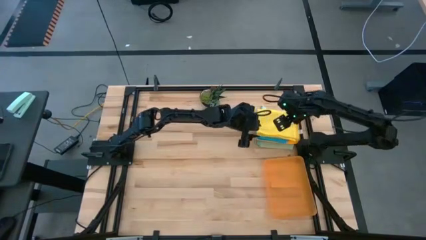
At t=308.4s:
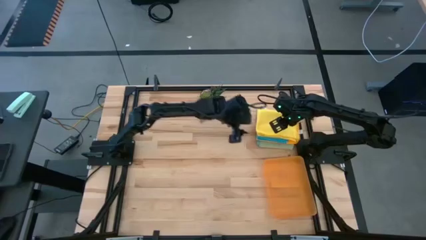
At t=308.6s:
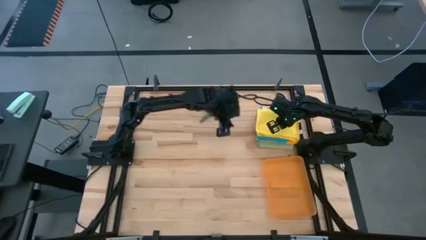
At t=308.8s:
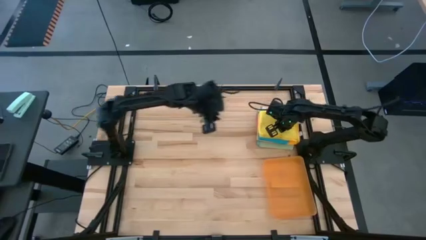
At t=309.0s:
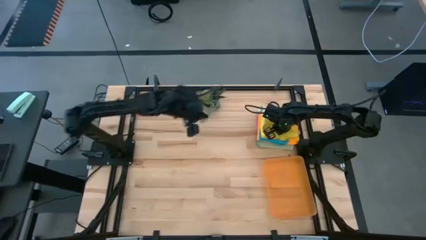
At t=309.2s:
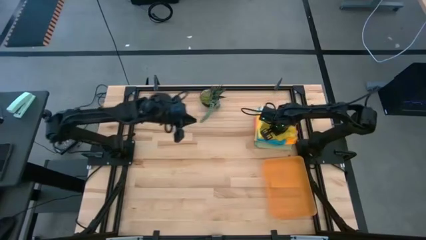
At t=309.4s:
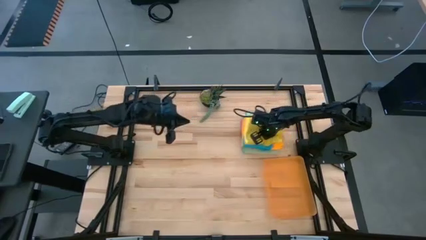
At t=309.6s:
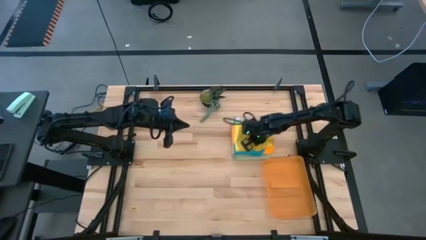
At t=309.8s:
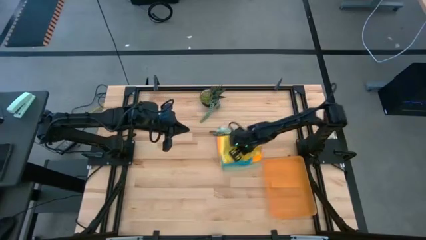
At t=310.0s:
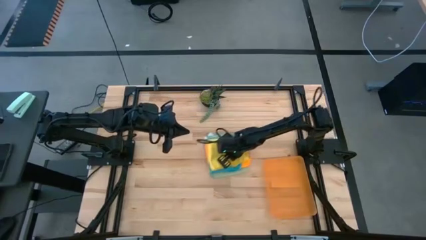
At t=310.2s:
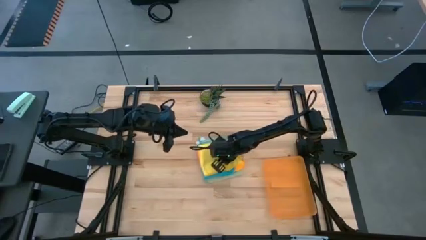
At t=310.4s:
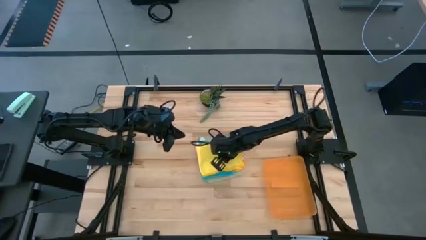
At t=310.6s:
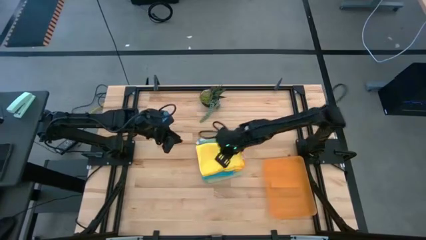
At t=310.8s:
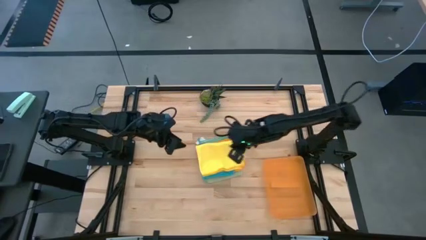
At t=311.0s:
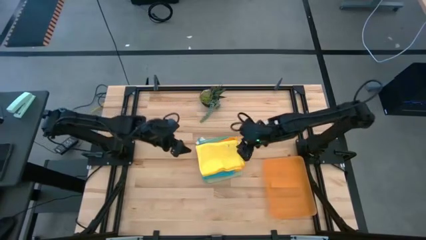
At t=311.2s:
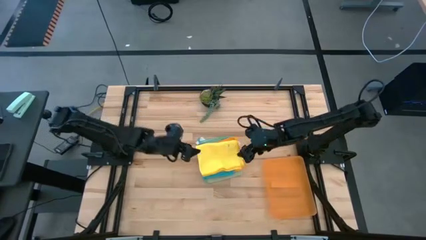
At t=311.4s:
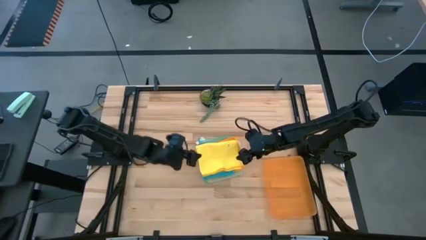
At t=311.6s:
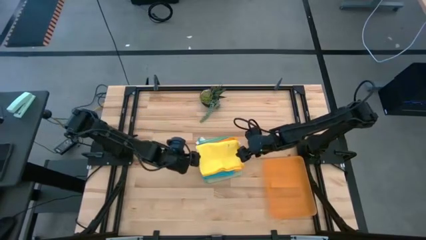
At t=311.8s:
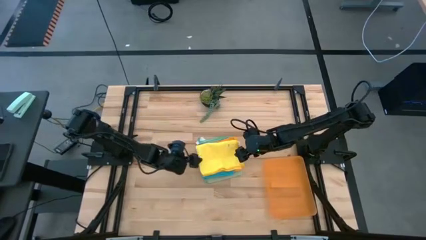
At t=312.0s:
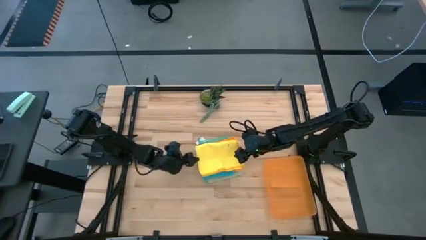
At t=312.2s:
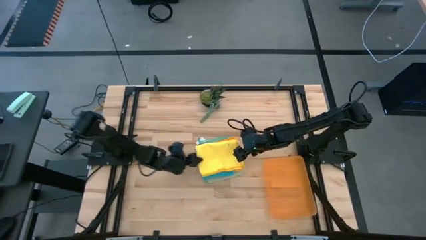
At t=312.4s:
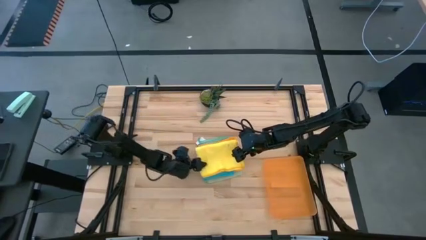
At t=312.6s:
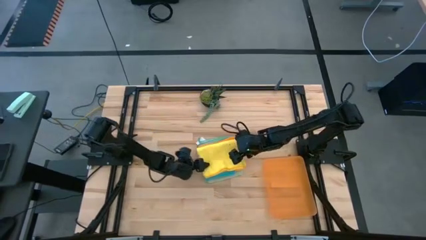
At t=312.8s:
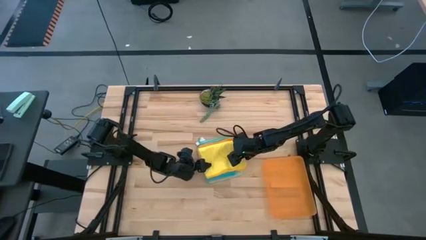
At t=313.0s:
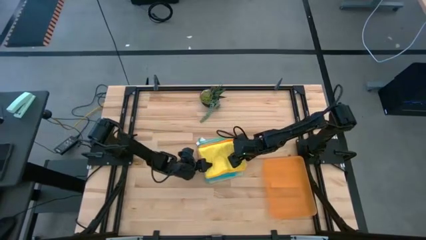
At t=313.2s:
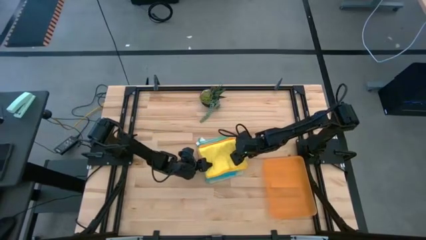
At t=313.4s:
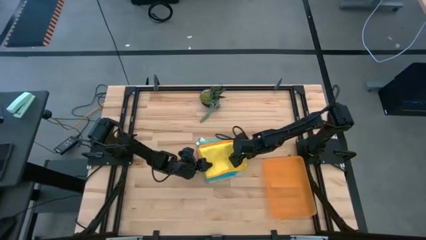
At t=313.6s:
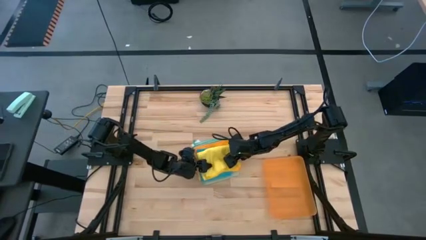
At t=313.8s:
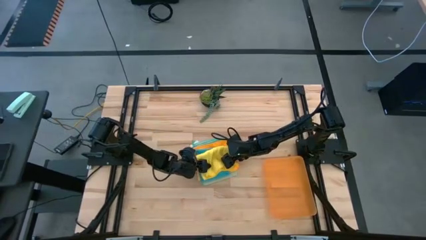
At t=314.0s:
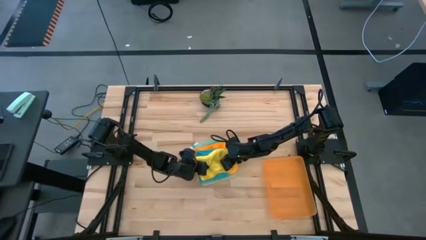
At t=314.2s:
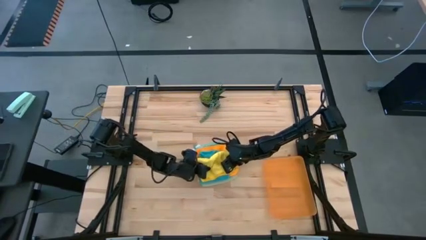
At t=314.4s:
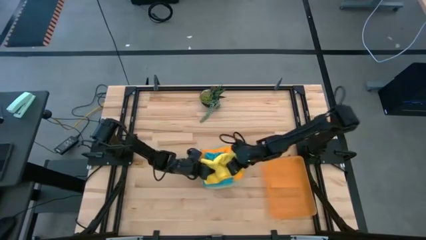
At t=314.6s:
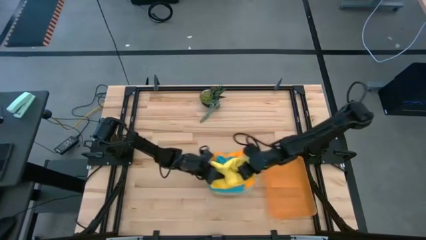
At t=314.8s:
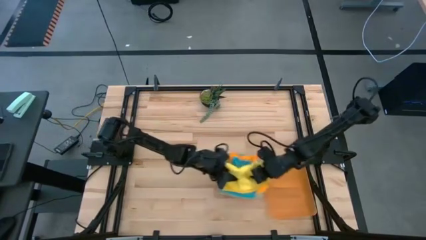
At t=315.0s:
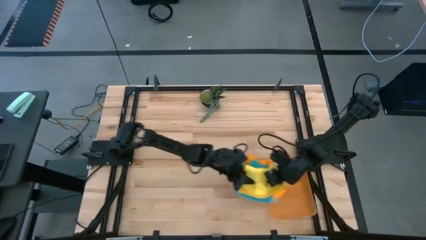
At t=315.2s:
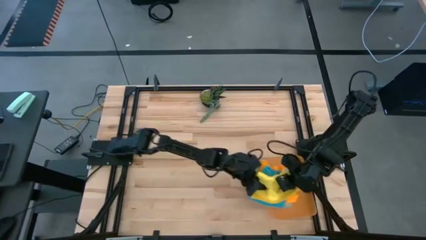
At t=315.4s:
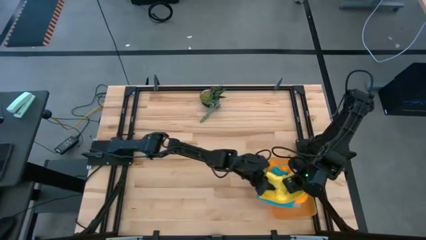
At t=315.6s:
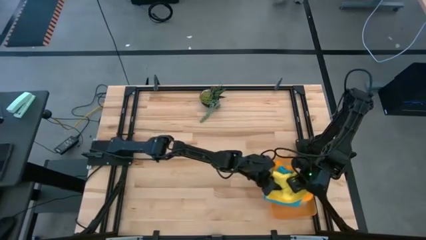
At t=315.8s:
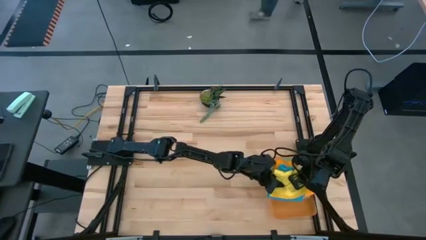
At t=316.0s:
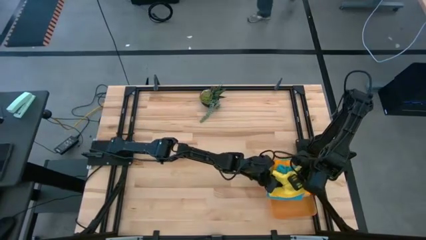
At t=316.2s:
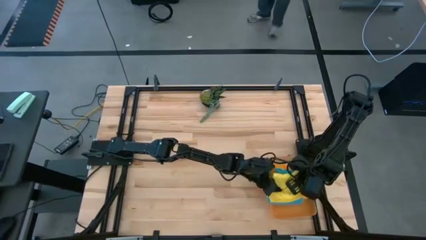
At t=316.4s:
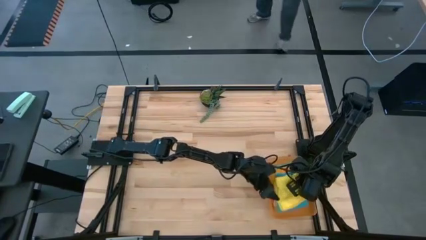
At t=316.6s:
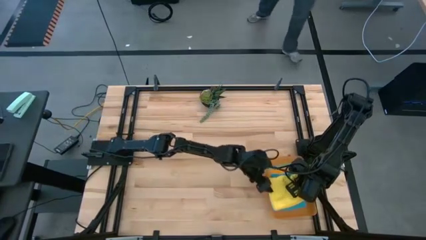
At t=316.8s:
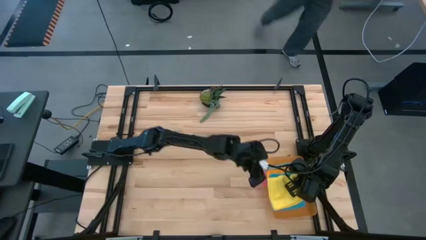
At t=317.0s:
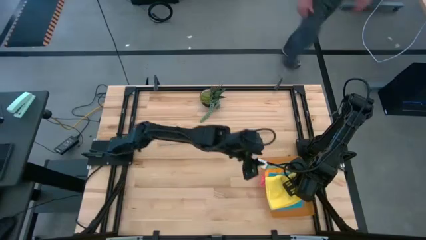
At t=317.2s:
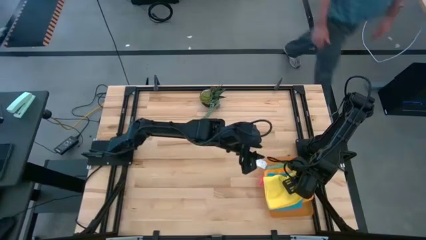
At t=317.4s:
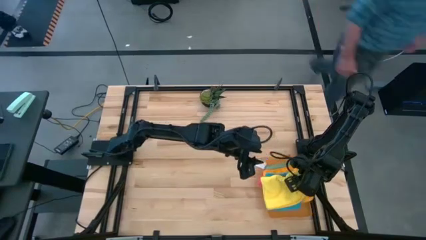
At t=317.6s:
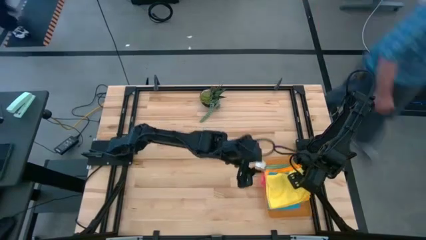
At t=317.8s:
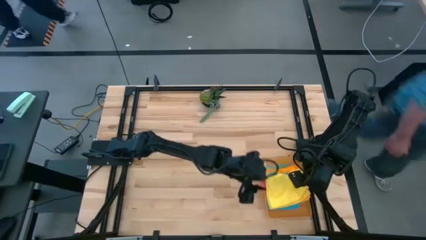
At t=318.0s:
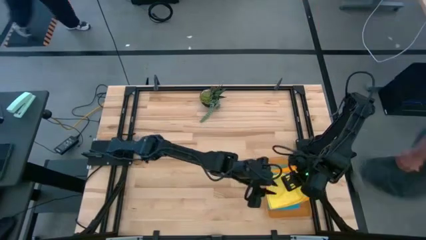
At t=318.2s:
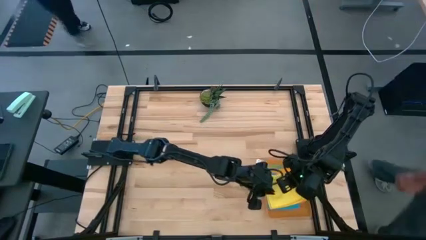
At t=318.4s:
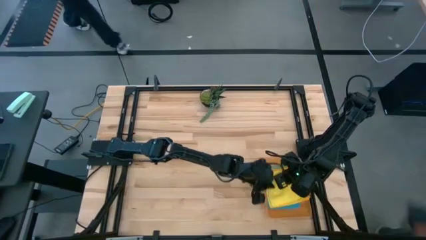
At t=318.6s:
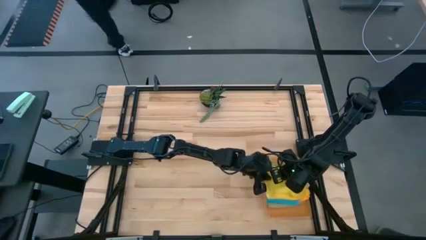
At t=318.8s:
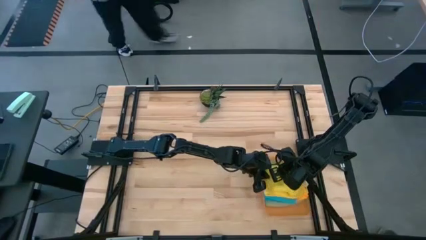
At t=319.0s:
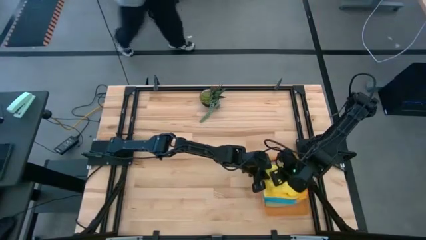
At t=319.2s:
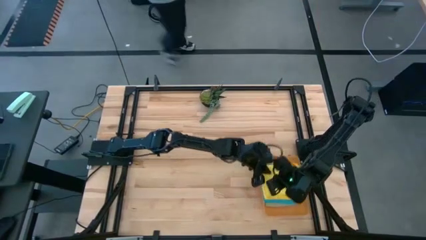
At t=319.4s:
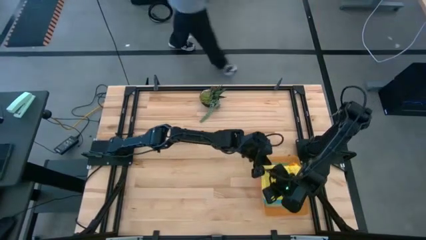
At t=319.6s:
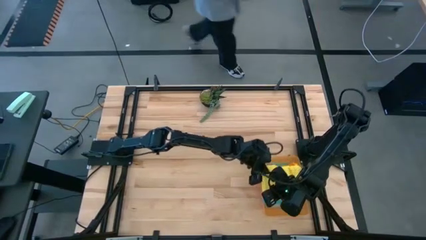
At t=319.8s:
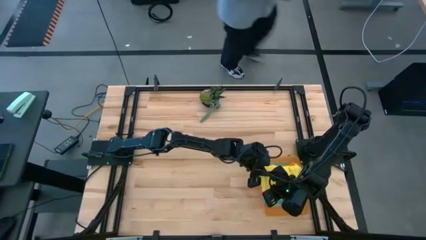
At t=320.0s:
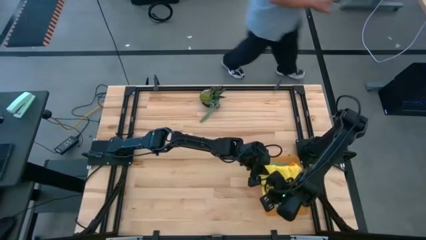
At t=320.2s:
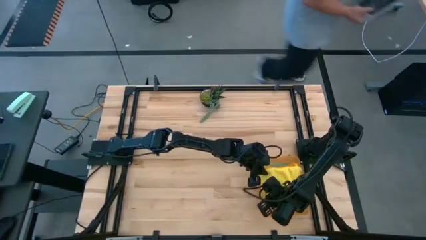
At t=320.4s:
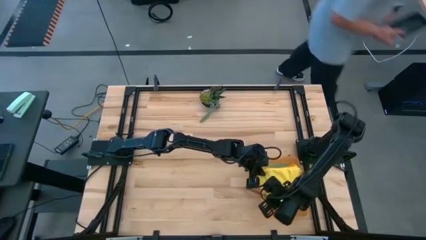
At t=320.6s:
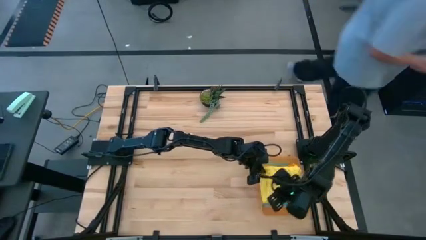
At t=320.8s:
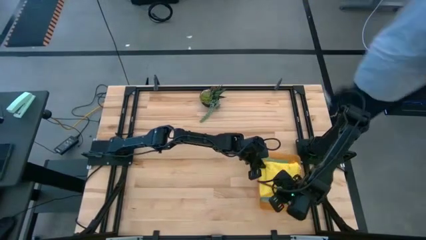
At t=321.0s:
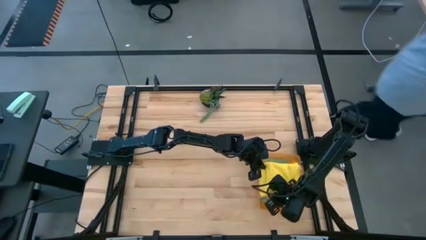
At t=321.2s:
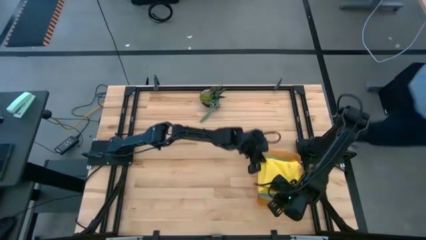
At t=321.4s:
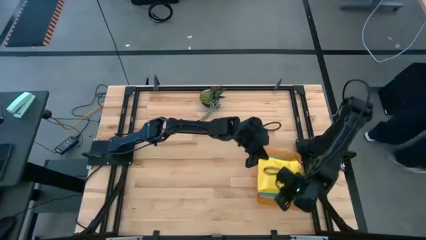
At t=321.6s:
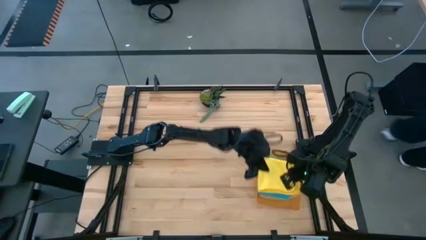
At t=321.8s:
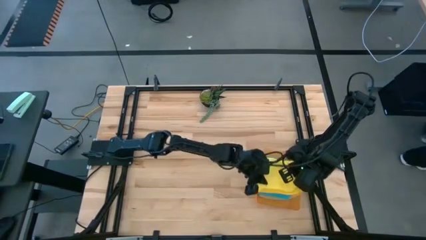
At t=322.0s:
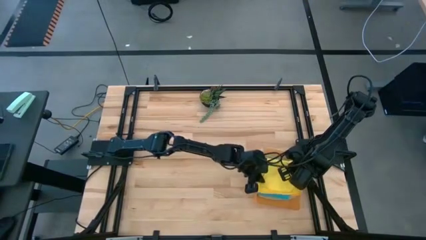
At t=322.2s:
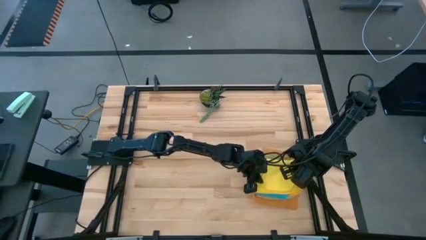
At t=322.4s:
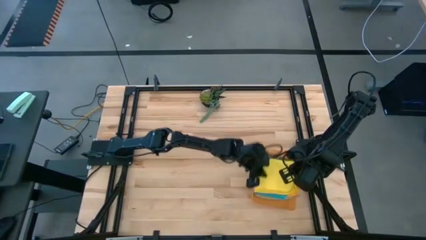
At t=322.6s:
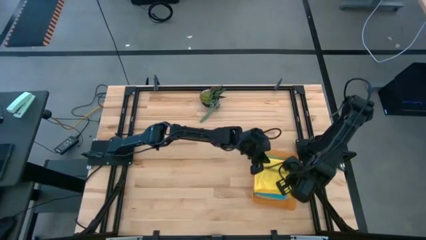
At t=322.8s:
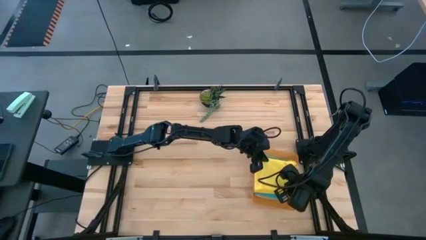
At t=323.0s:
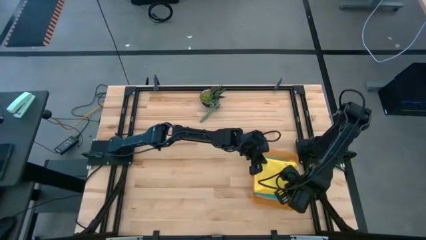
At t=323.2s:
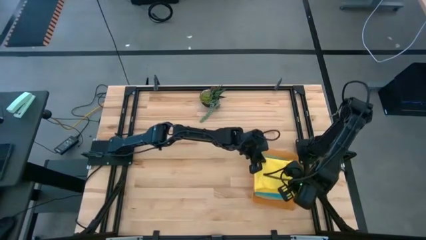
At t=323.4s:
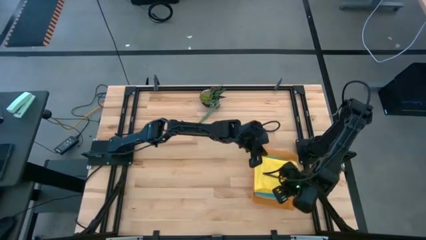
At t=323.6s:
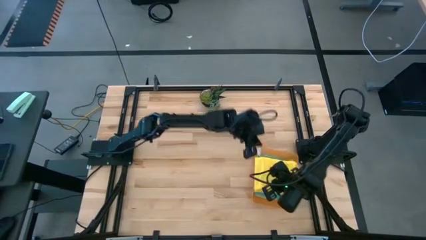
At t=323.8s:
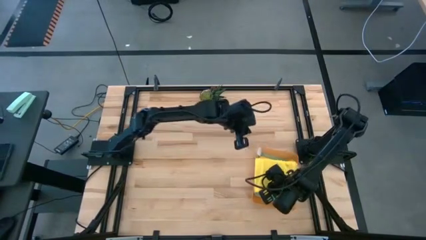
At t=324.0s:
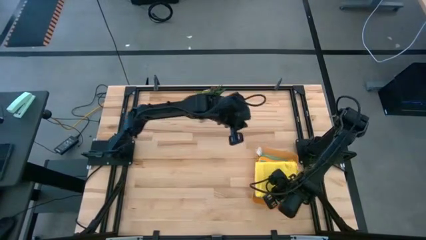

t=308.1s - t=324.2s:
Task: Fold microfiber towels
Put the stack of microfiber towels in the bin

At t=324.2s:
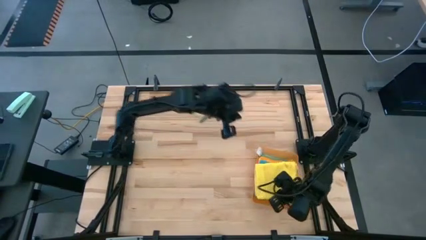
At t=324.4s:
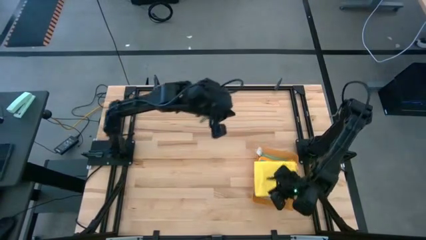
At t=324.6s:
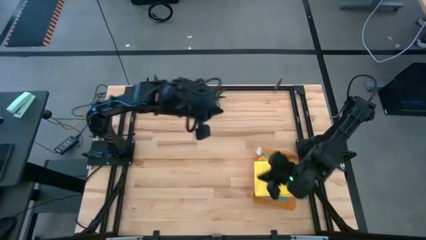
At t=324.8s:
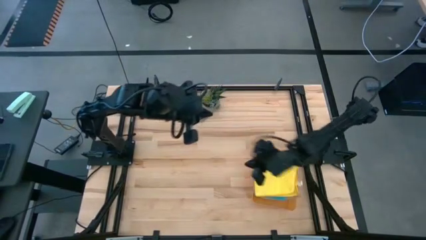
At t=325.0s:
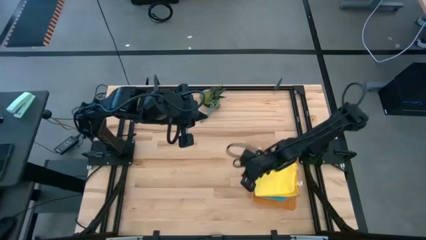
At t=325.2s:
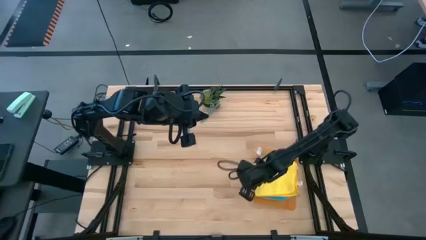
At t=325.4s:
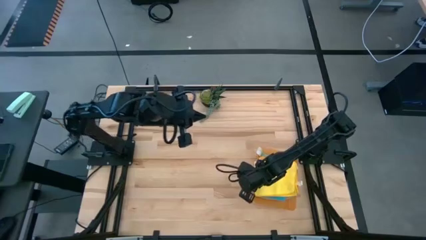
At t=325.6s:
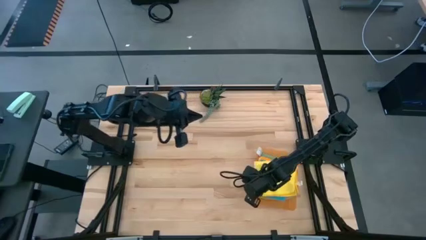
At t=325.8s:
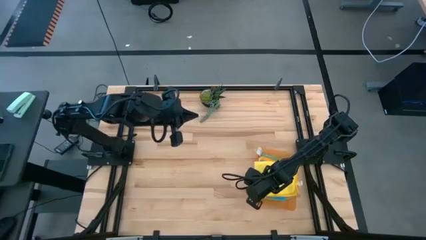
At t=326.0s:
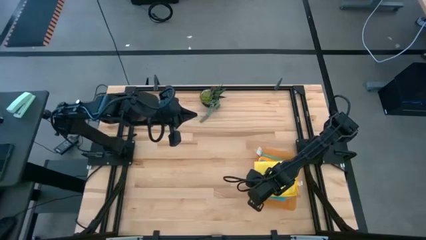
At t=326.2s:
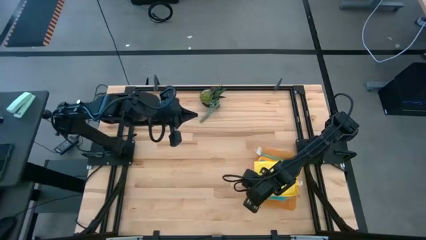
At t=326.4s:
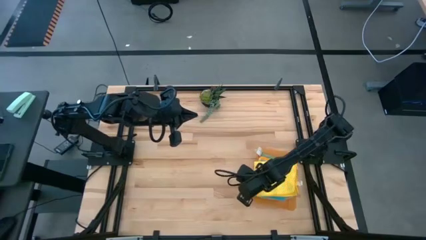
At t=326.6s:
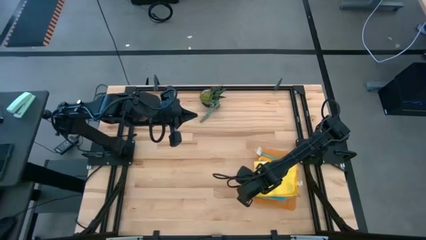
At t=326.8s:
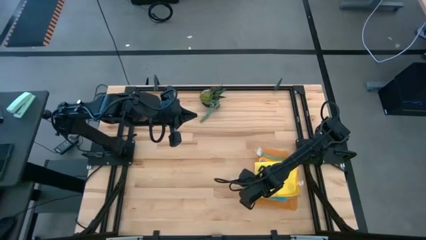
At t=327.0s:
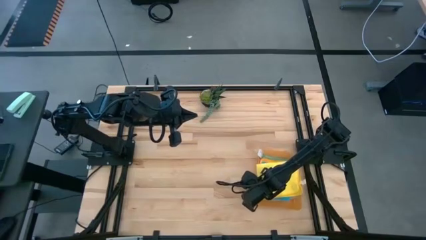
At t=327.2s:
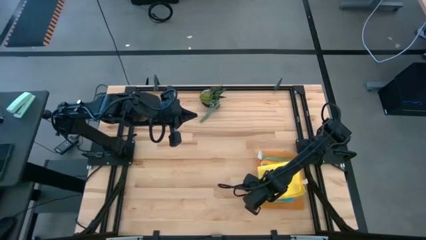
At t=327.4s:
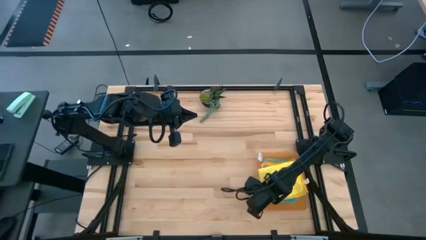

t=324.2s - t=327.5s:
Adjust the bin
